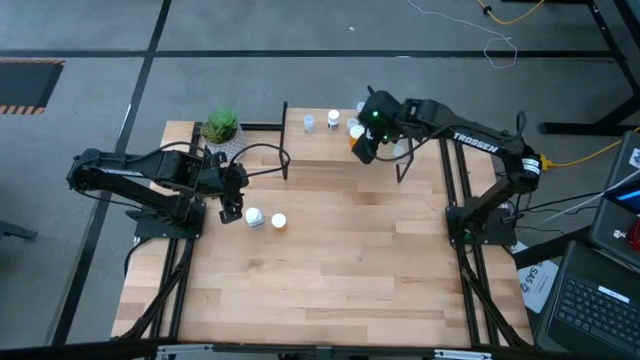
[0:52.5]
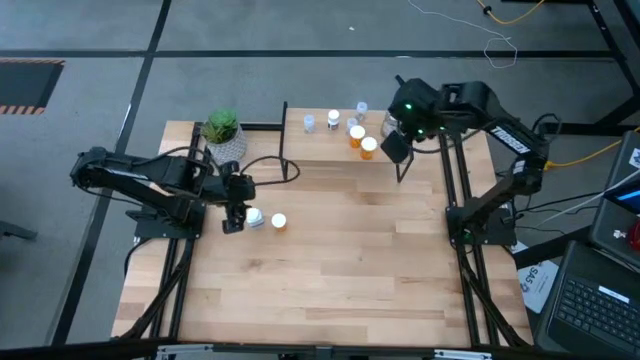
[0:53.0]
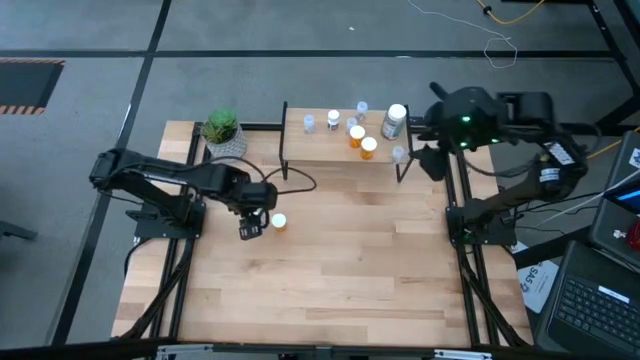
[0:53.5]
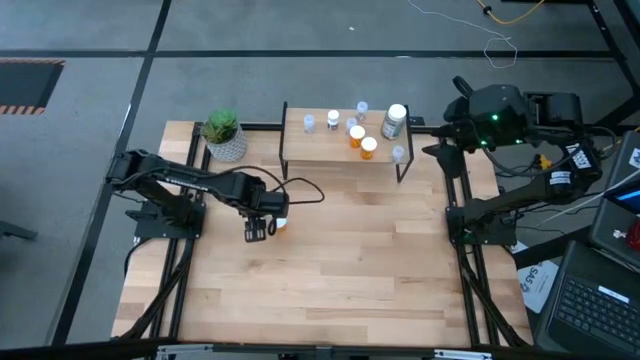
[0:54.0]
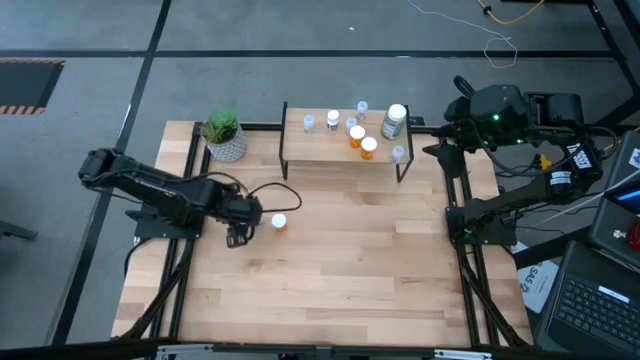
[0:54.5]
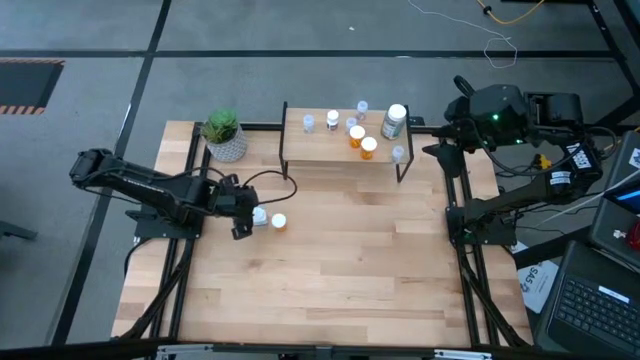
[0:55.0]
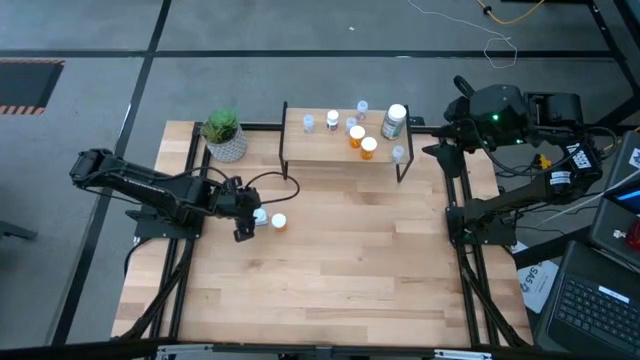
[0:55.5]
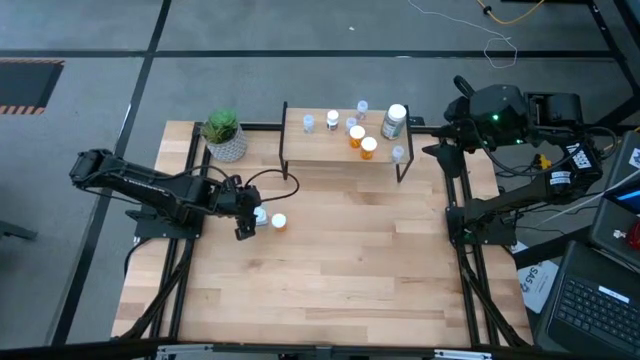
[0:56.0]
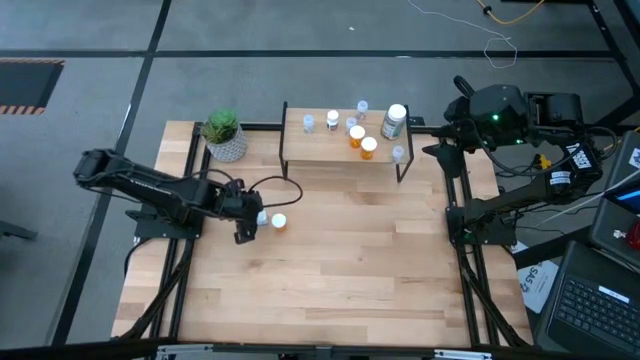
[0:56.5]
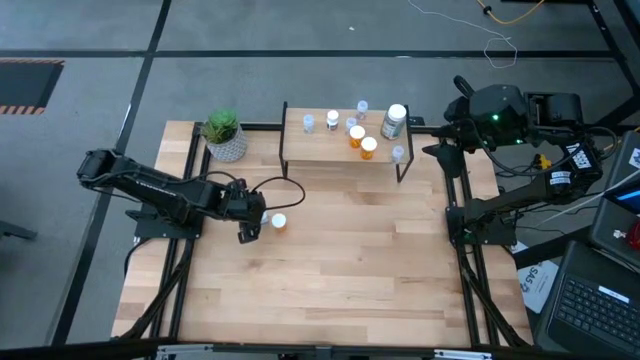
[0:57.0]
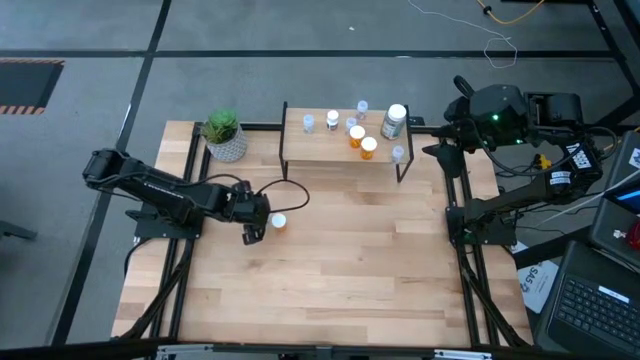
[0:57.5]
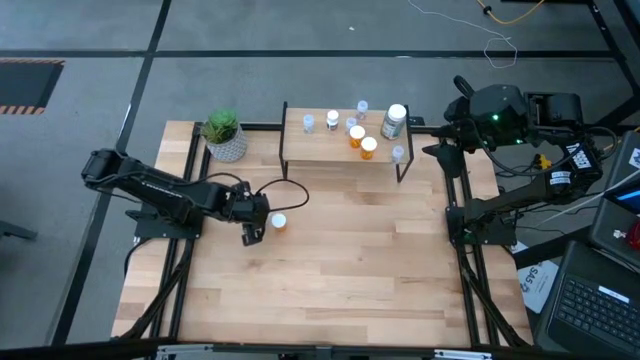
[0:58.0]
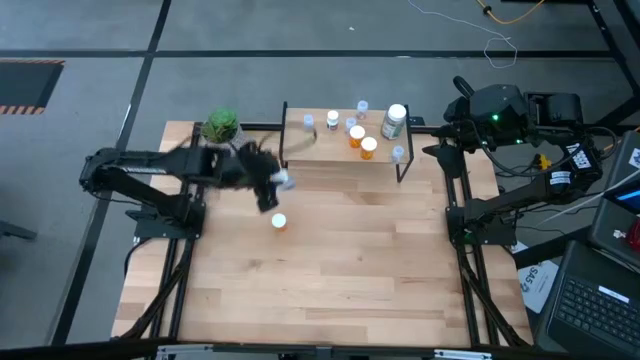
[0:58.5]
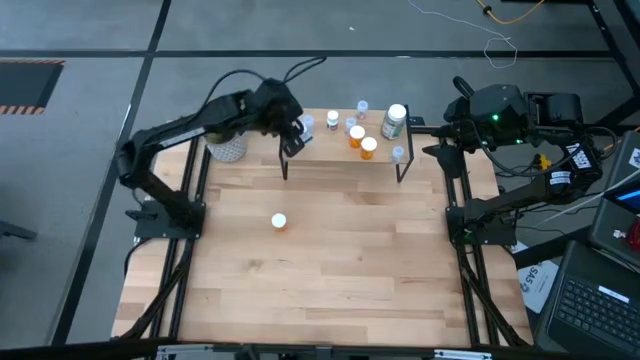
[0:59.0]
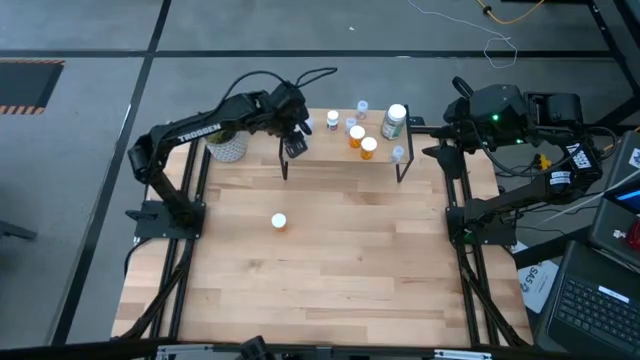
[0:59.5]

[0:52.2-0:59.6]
Task: Pick and place medicine bottles onto shelf by color
Put the white and blue pill bottle on the shelf

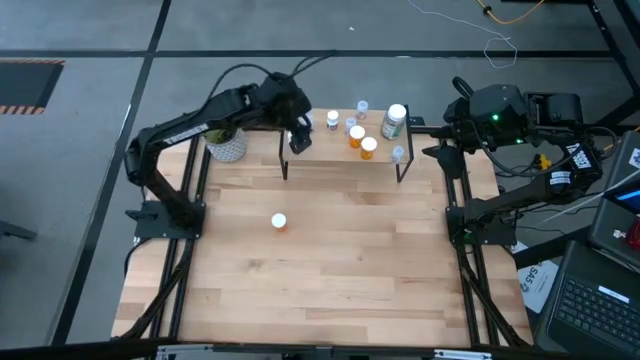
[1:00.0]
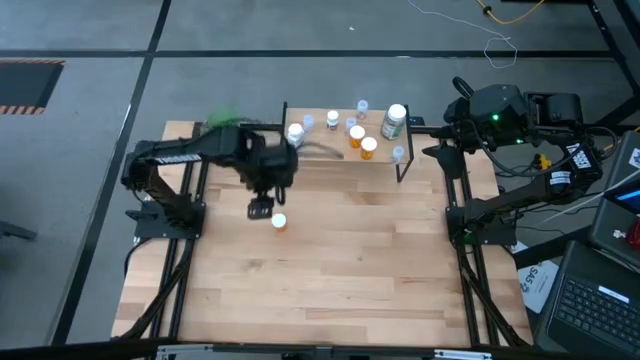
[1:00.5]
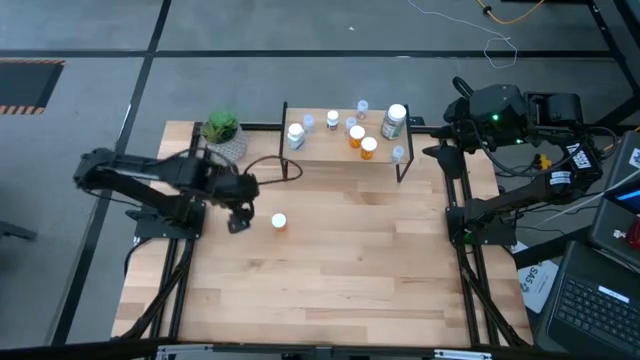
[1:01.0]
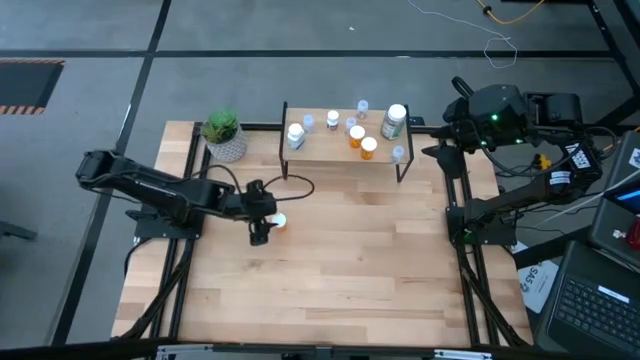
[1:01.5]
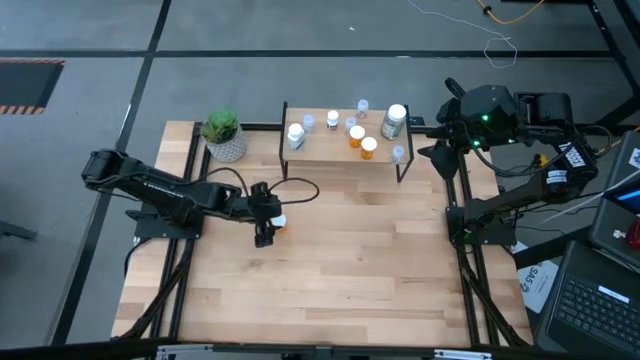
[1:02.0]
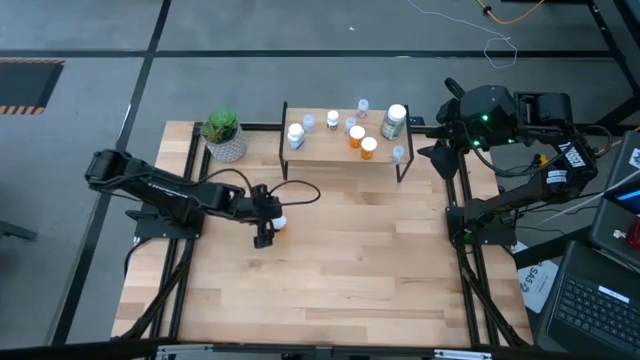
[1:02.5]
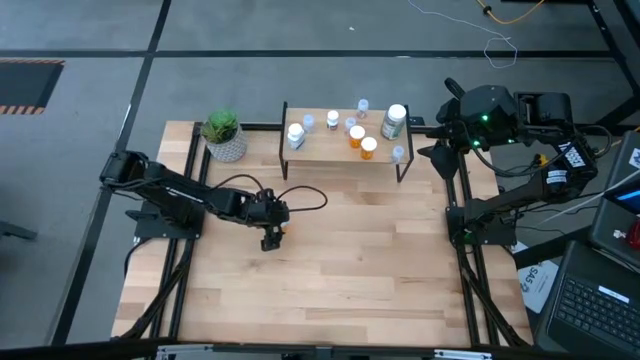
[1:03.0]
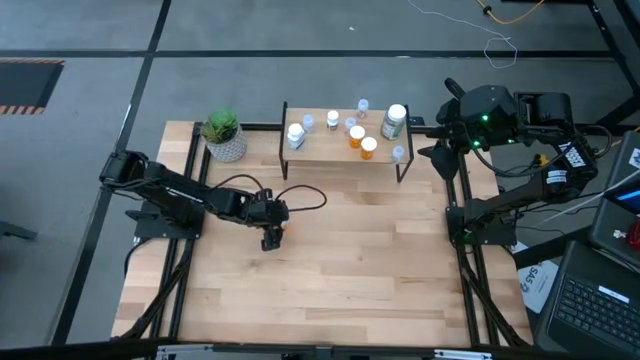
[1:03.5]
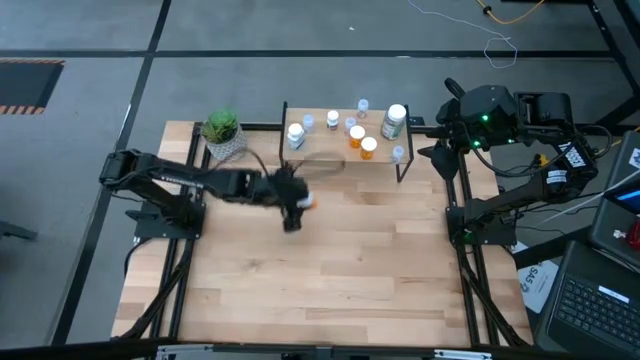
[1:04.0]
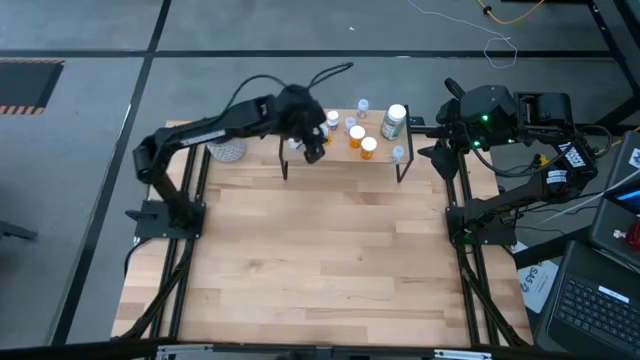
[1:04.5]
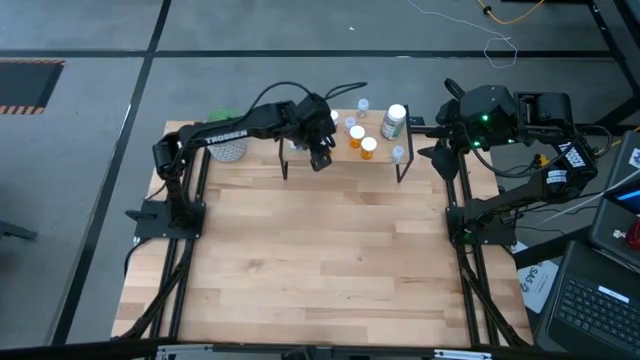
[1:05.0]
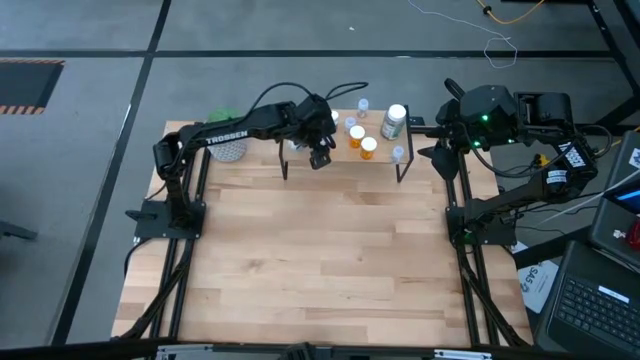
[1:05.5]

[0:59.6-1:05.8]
Put the orange pill bottle on the shelf

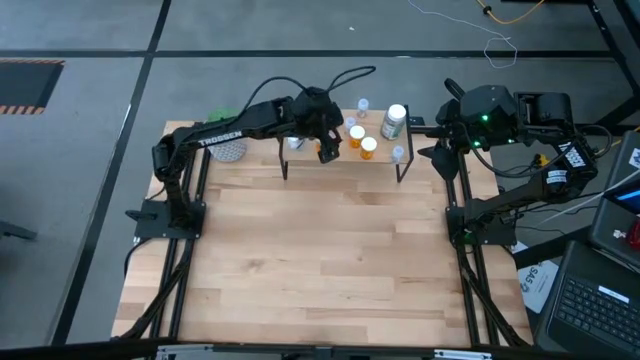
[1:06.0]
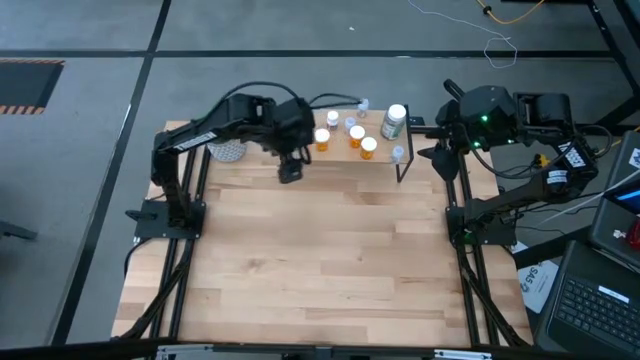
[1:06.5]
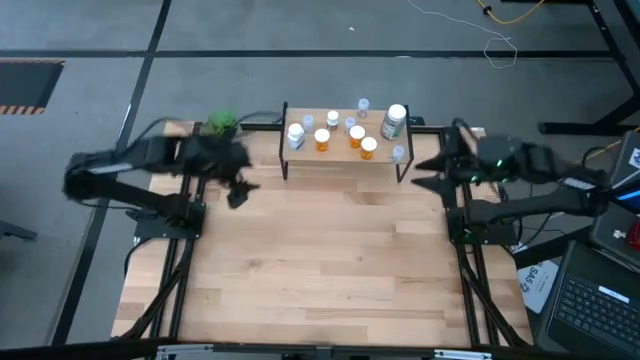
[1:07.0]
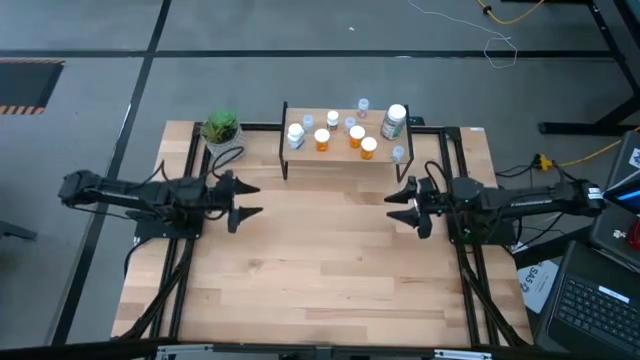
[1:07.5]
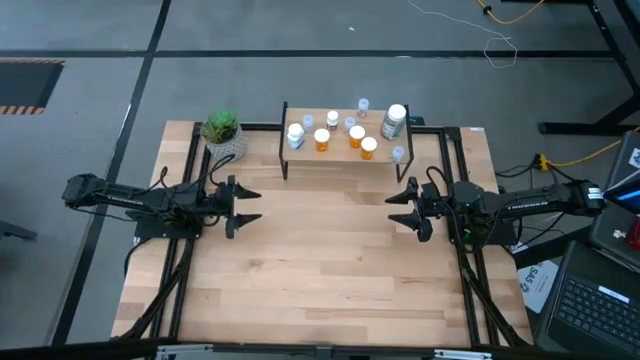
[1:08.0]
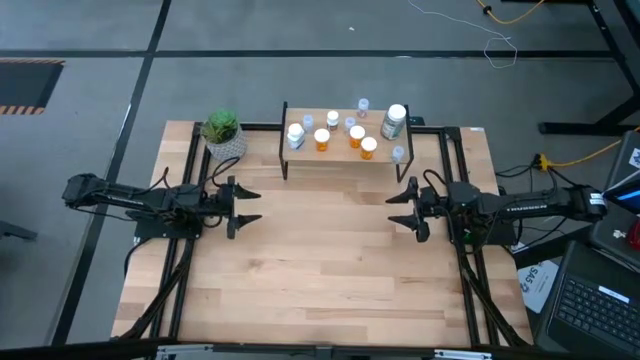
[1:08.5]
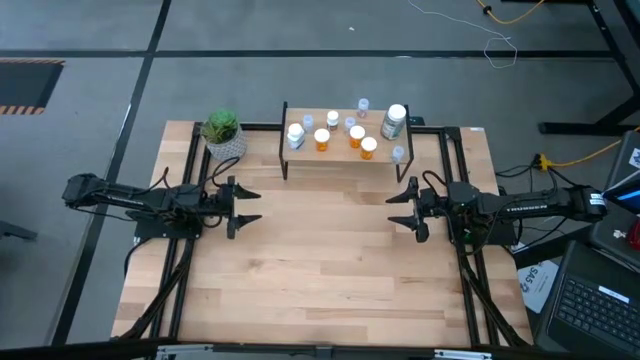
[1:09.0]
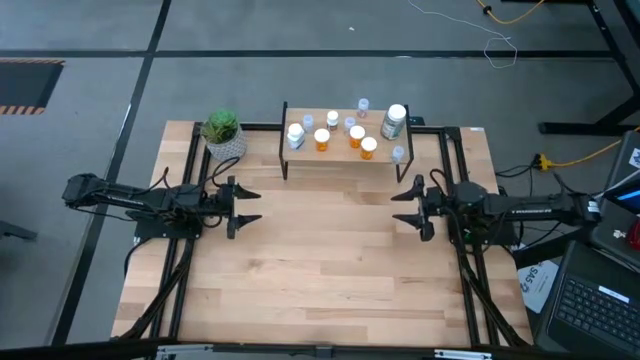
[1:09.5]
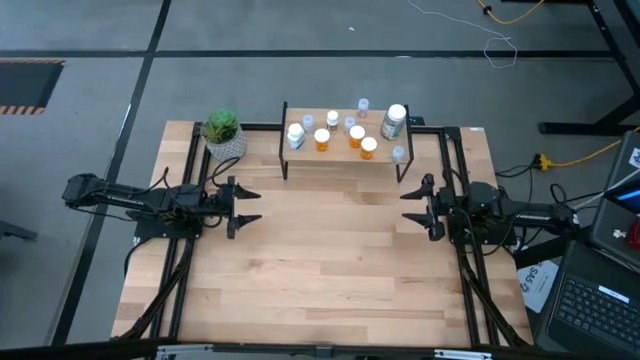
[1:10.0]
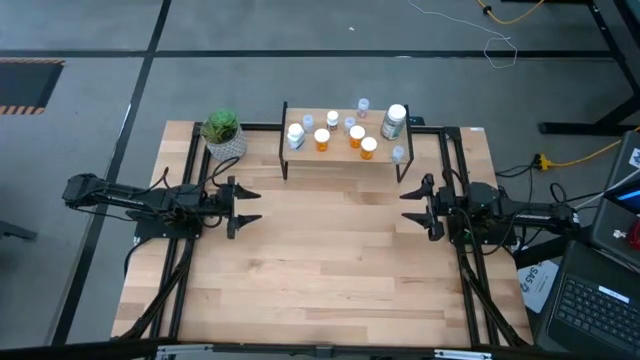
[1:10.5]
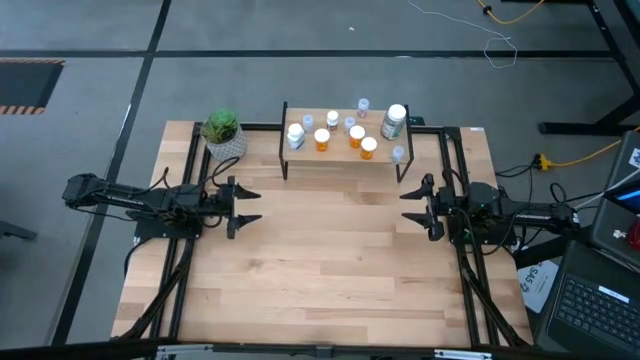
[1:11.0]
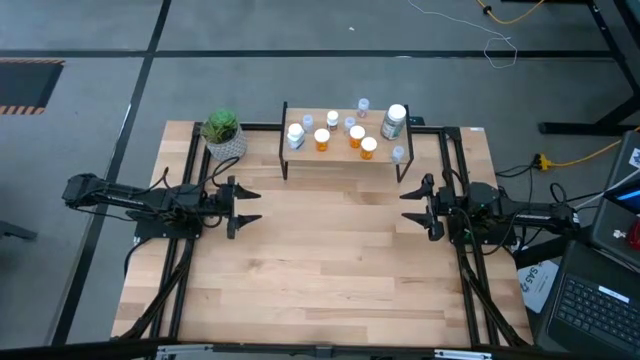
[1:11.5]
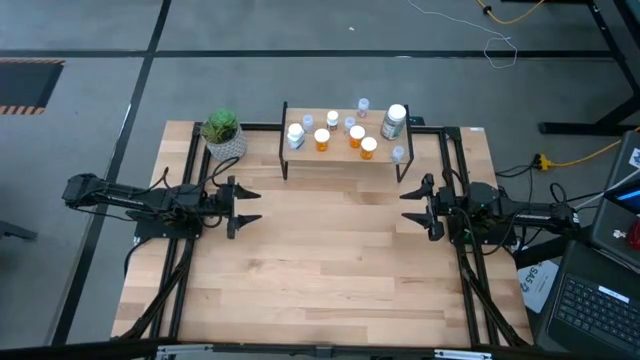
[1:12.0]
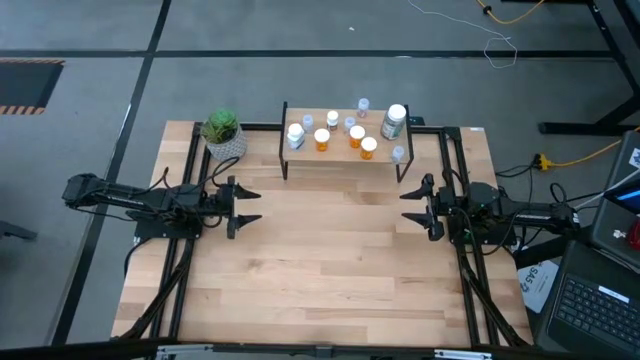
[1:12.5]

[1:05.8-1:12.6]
Return to Home Position
